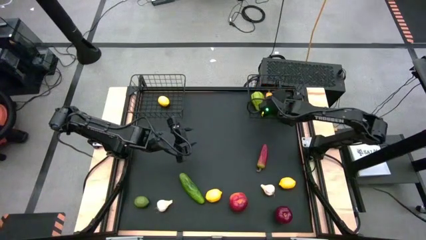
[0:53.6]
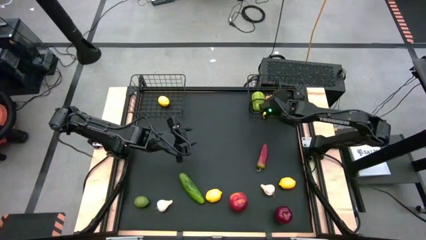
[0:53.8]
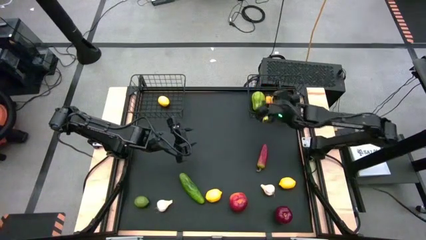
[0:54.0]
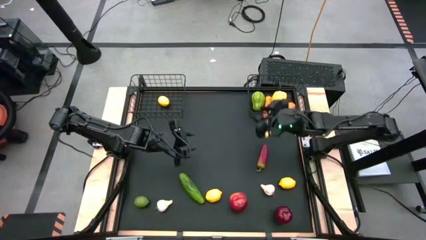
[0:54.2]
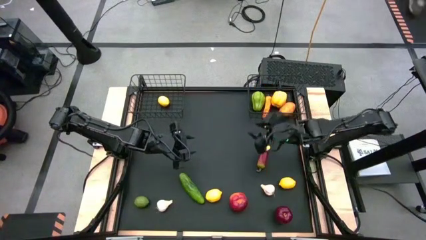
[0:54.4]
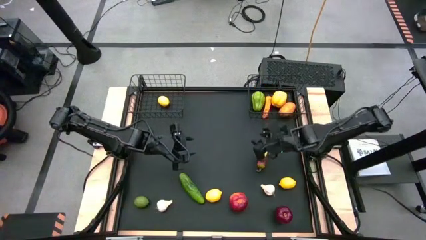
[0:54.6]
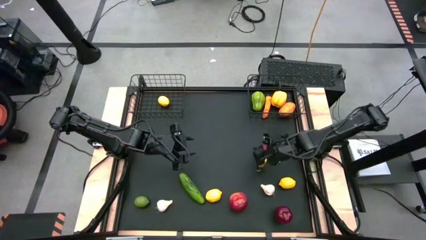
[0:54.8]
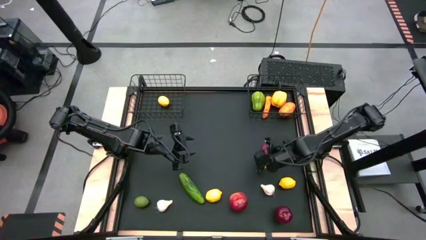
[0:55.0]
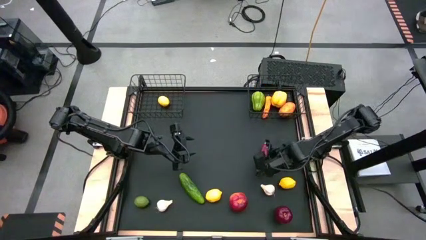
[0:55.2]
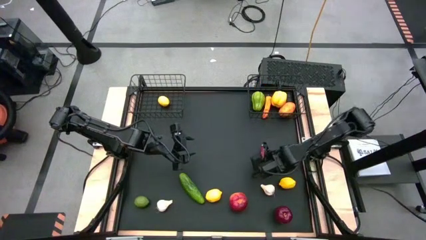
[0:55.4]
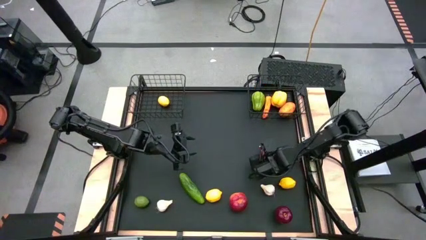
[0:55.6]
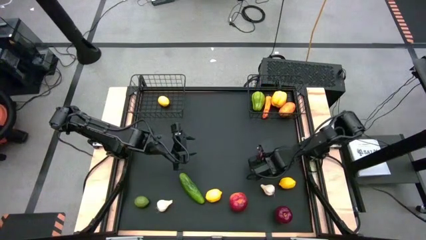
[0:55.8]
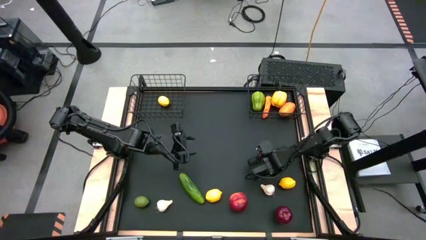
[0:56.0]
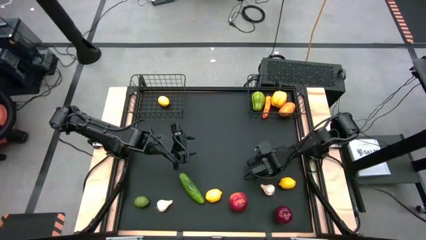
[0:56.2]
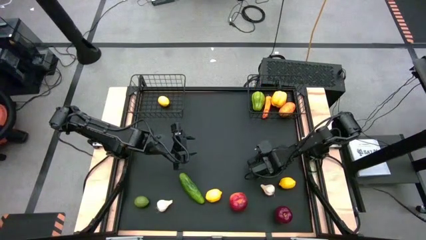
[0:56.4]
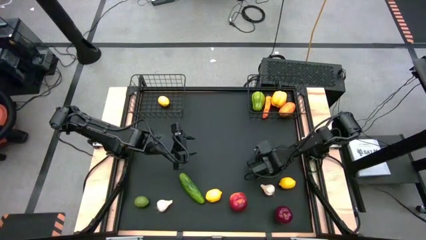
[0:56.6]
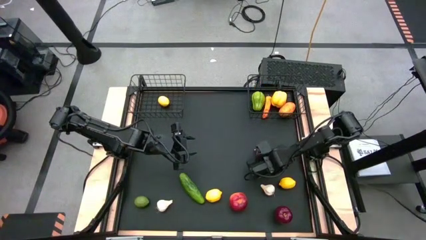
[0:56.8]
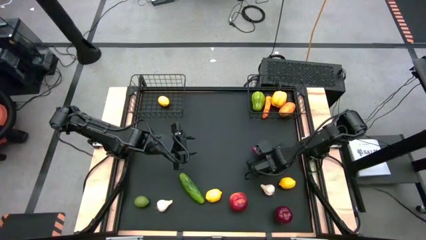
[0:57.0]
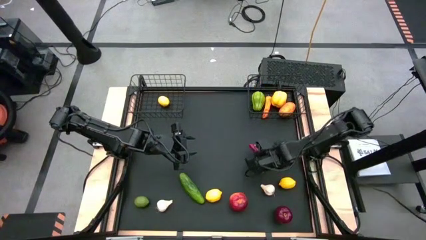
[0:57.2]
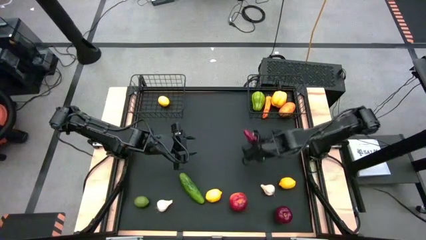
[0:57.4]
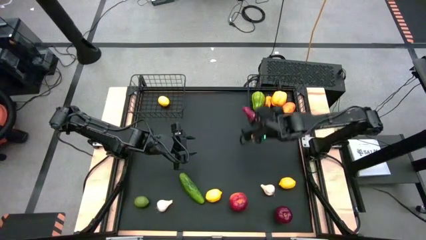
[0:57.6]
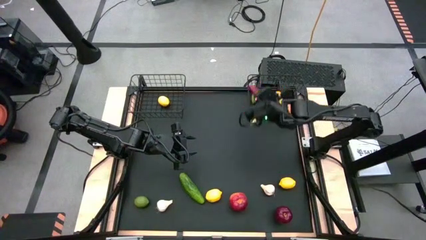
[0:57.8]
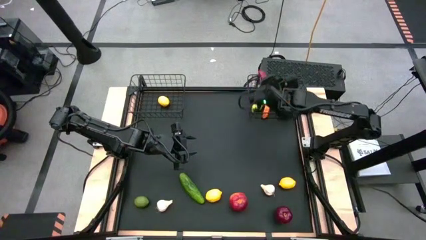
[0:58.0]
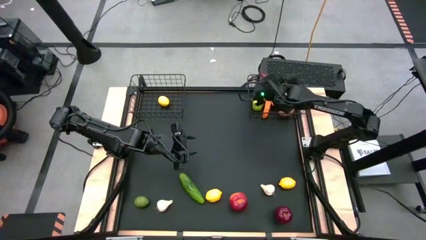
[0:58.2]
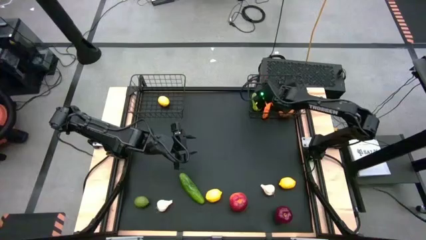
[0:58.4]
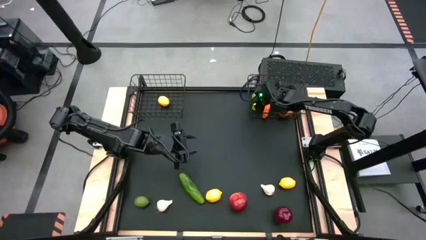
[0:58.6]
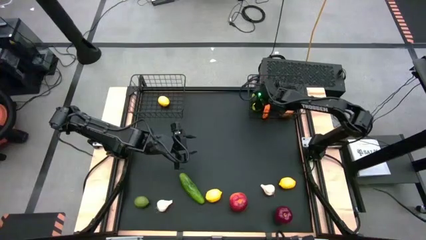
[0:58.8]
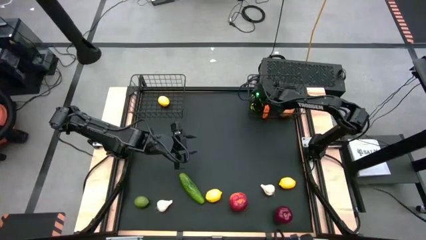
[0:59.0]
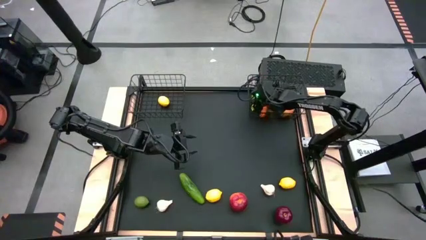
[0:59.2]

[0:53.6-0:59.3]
Task: Sort produce into baskets
Put the red chili pepper into the right black wire basket

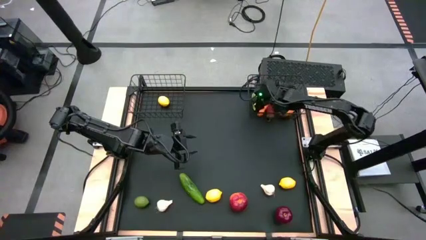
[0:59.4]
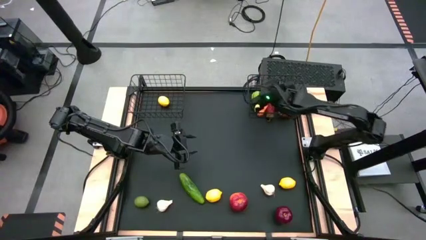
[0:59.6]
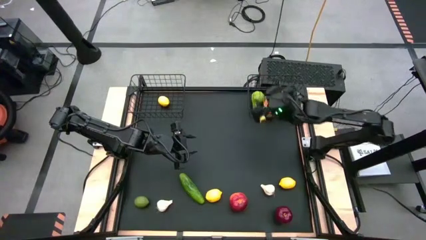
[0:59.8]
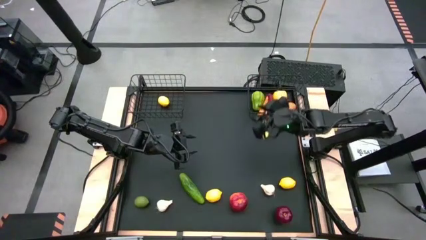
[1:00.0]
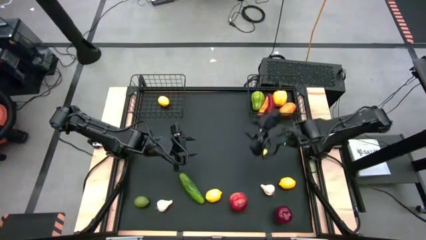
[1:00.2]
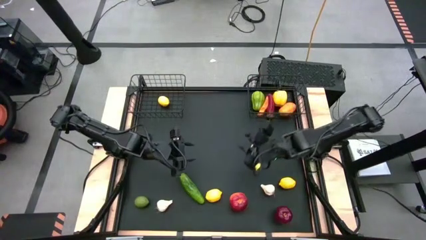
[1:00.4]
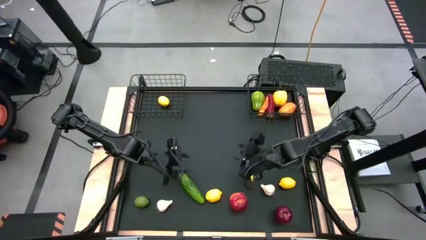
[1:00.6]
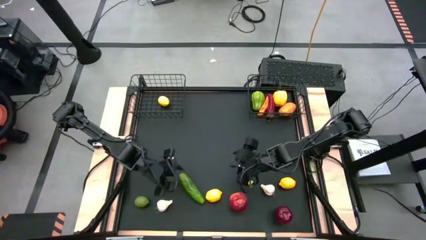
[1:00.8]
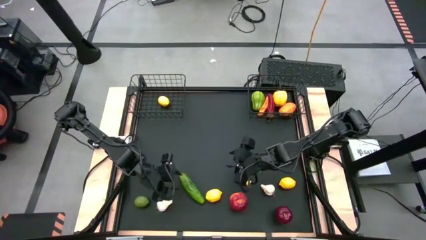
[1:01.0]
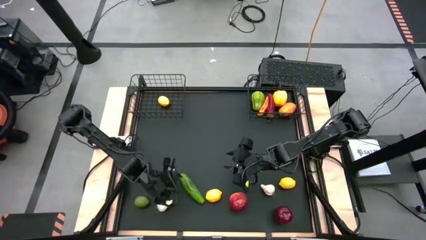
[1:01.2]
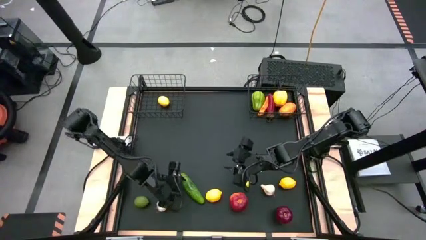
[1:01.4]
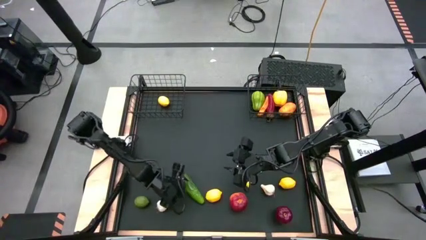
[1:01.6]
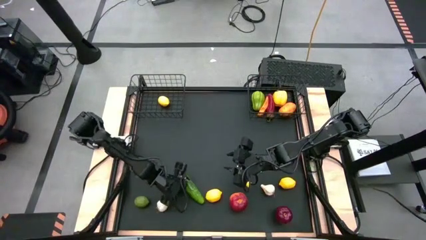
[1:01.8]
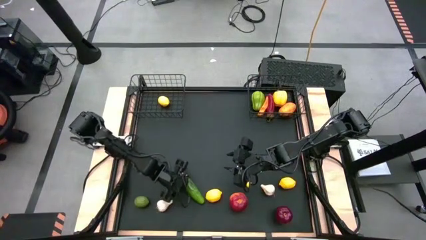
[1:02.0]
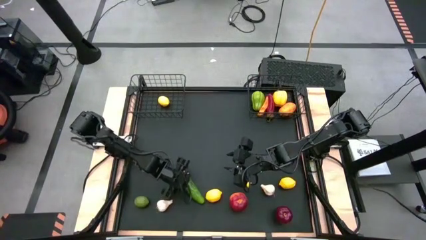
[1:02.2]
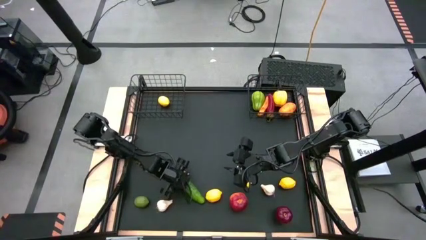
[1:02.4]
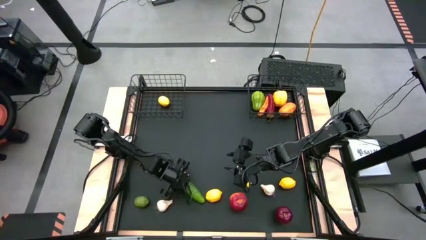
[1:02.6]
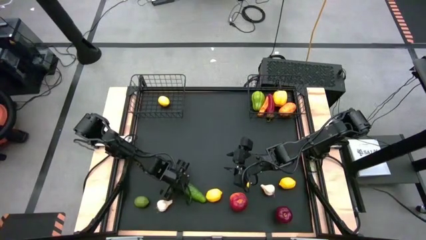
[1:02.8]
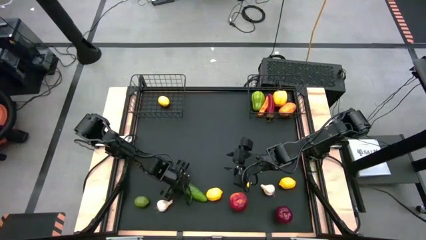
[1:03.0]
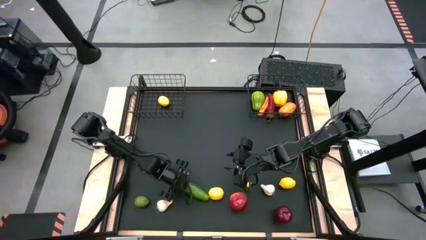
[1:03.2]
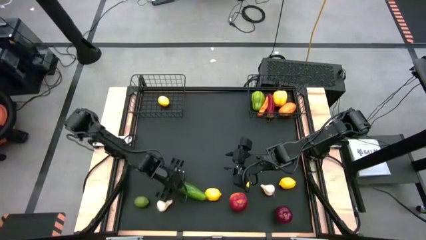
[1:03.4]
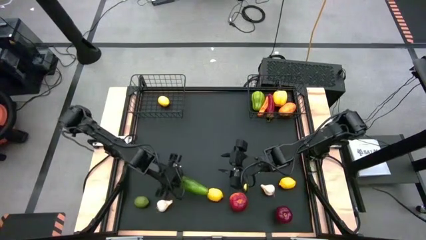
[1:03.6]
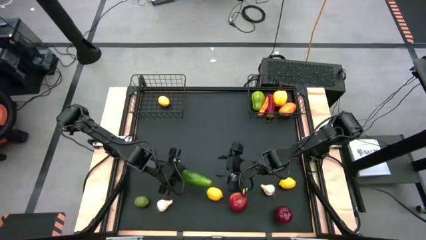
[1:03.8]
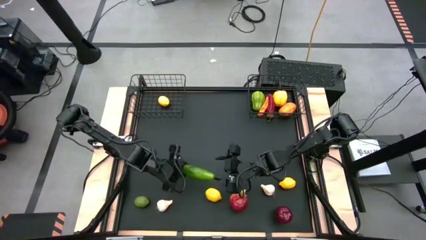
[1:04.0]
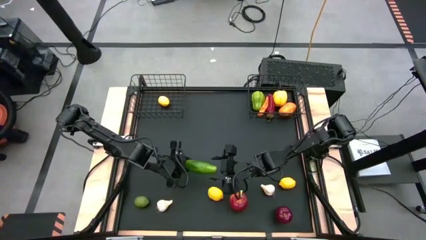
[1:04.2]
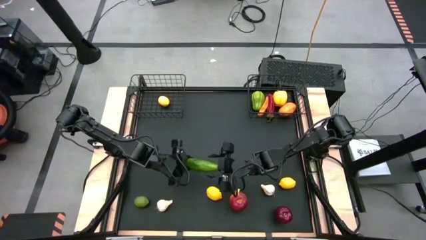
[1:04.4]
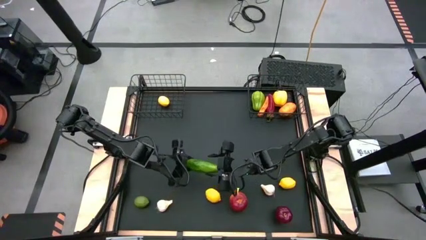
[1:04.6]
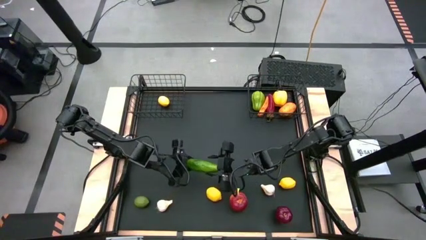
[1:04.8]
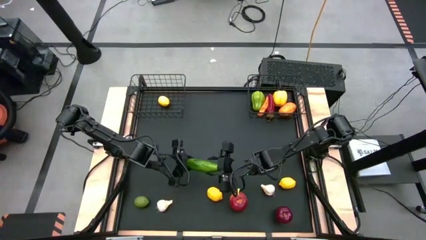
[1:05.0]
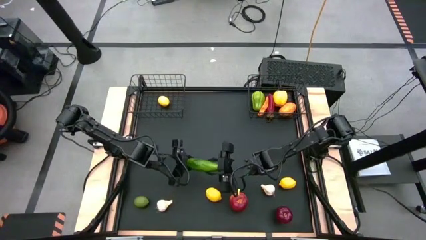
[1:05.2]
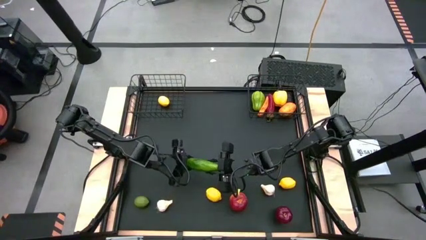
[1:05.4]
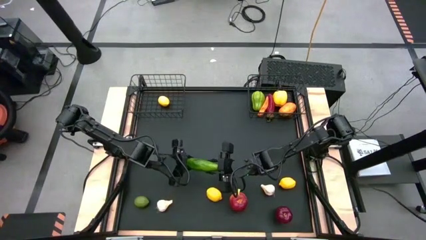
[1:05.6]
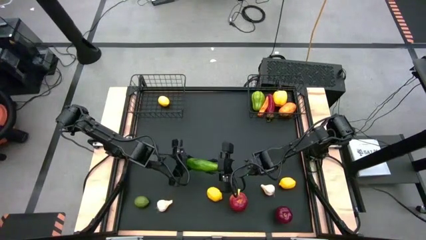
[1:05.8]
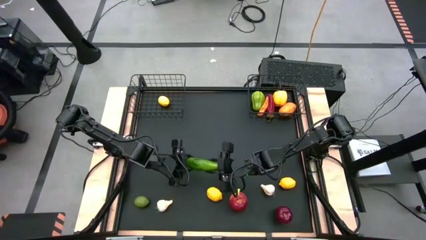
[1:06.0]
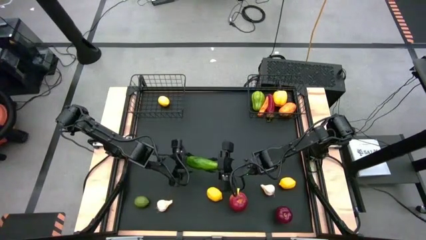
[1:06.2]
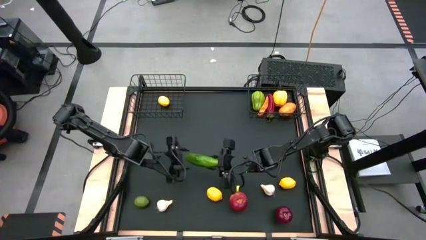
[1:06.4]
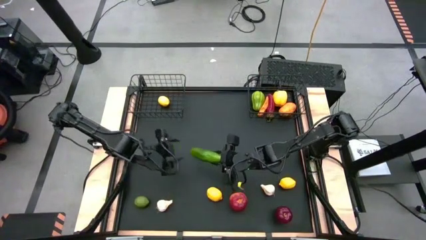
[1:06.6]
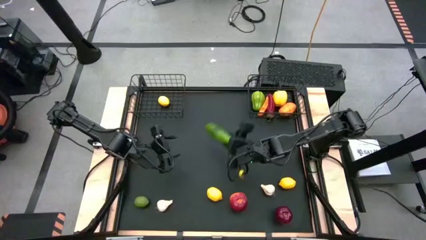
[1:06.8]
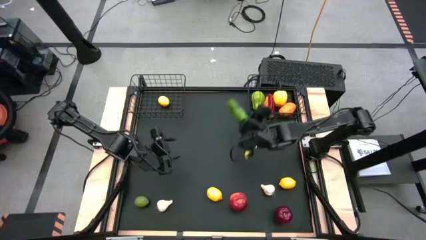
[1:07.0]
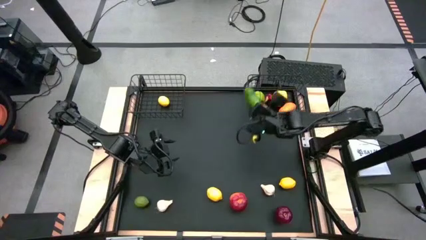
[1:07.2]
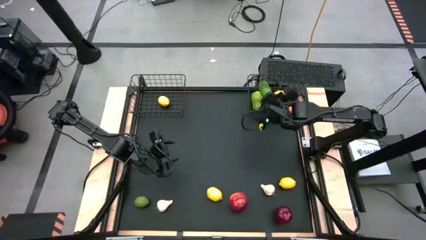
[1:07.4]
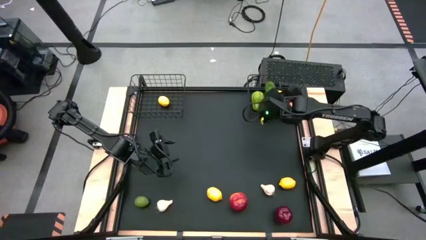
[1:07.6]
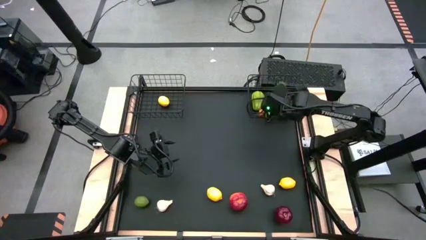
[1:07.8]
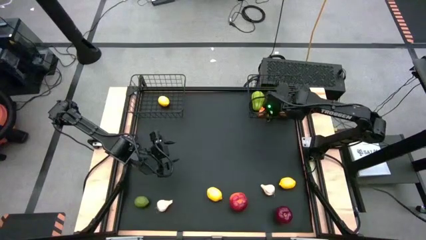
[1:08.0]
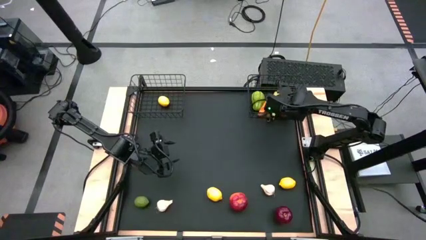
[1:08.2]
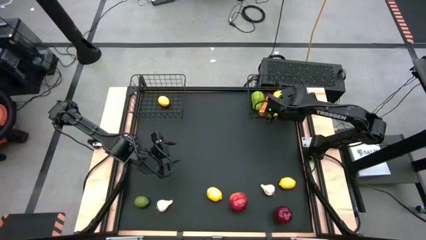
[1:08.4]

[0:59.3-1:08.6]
Put the green cucumber into the right black wire basket

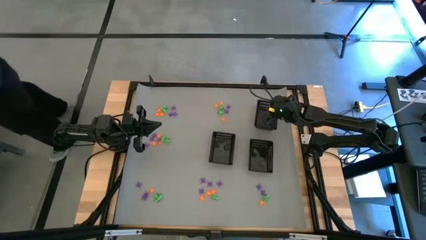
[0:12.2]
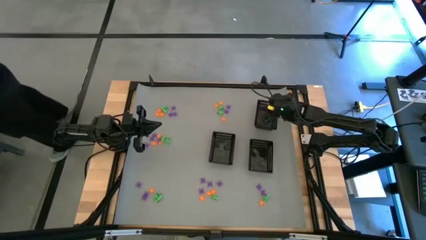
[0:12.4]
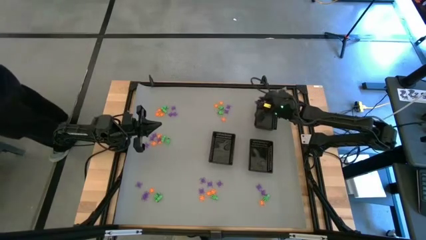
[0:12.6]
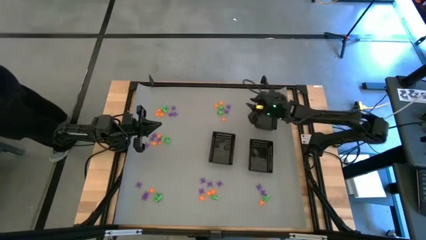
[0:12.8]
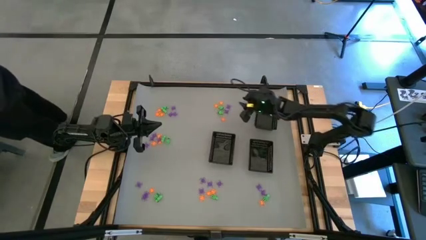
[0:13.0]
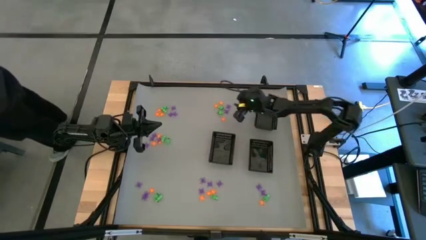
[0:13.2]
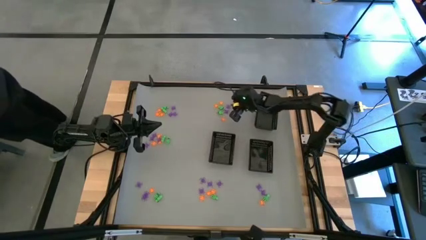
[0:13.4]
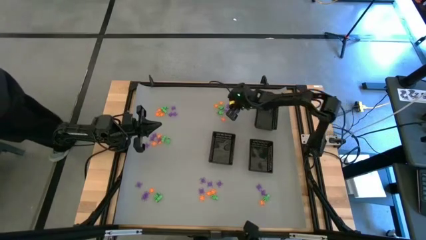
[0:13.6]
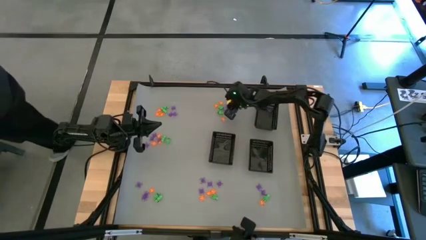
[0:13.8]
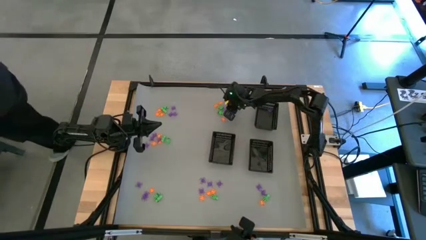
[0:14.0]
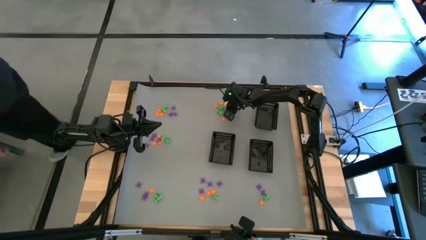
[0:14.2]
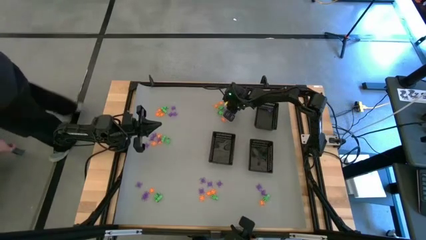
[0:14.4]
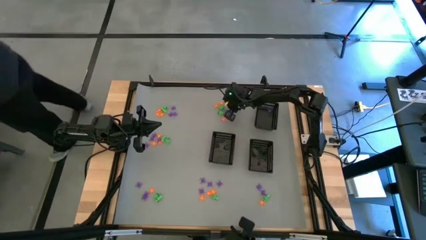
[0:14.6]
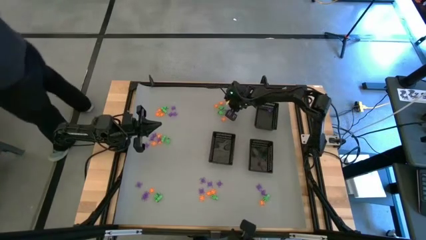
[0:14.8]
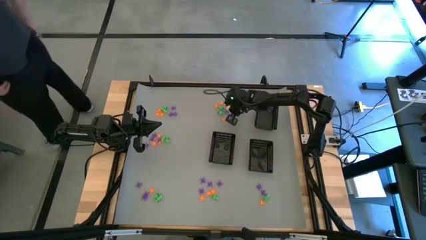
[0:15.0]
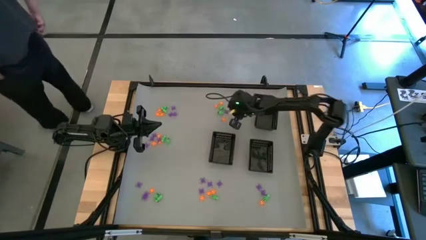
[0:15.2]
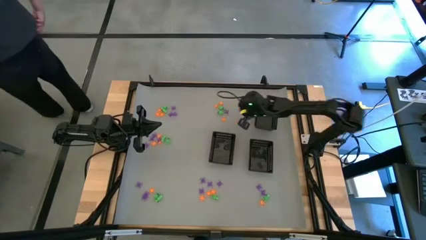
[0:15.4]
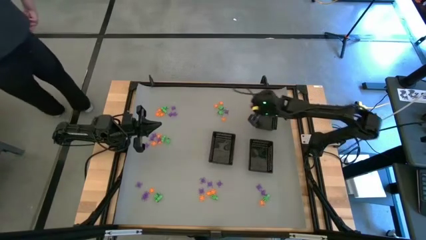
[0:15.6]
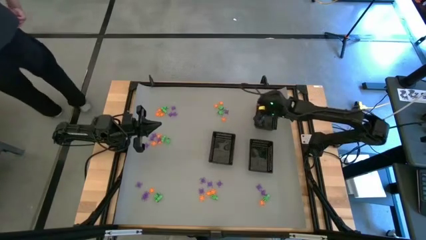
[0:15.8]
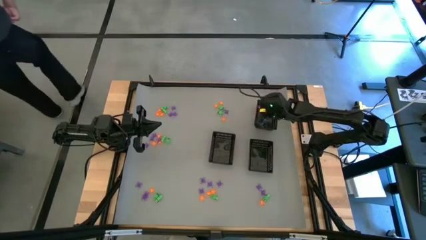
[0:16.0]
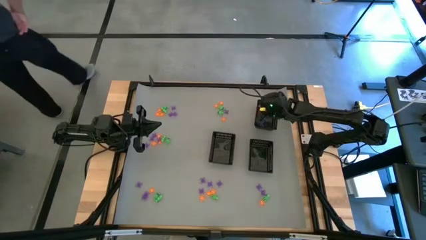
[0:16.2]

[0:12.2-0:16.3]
Task: Sort Halloween decoration
Put the purple spider toy into the top bin
